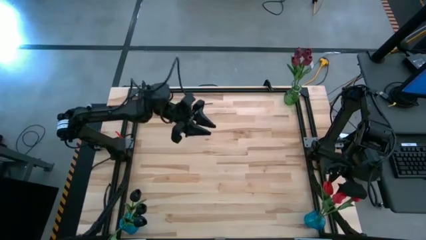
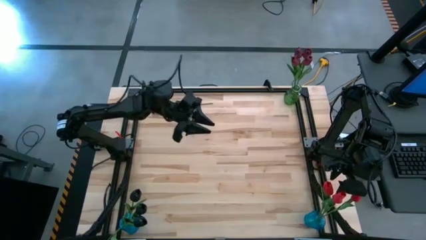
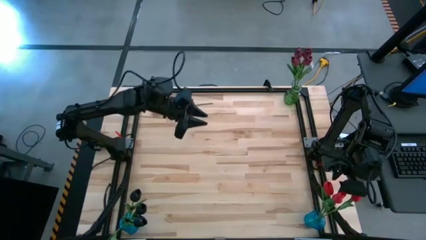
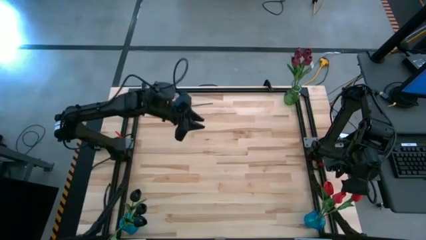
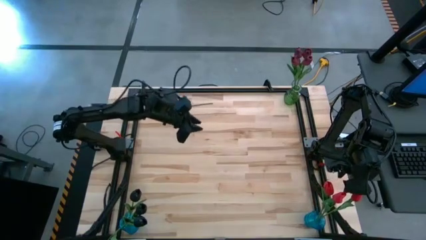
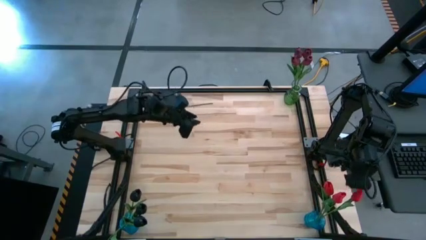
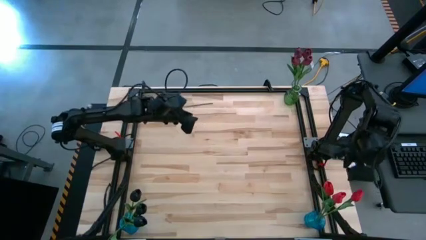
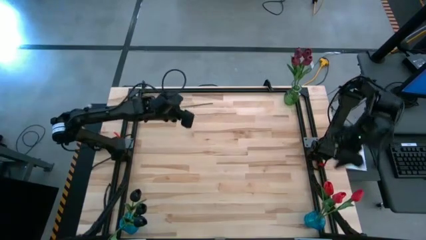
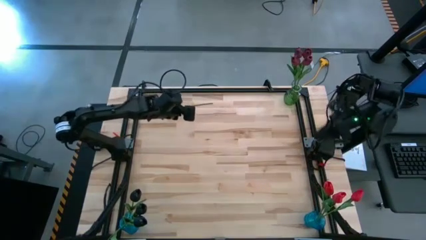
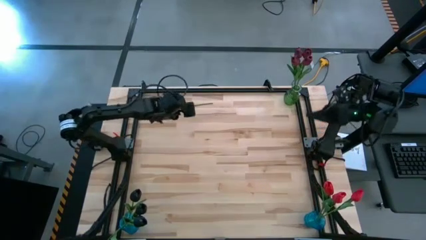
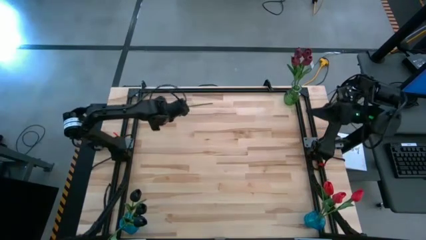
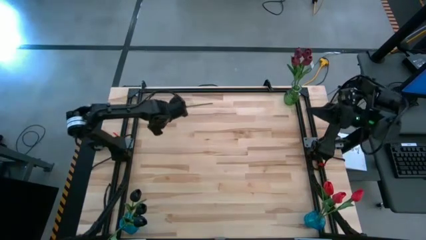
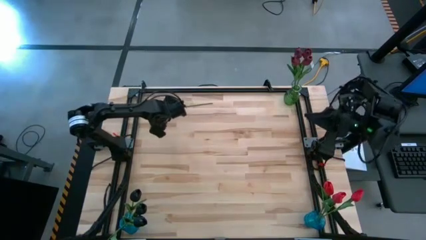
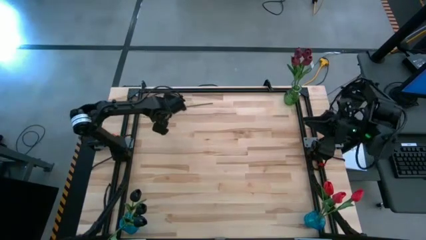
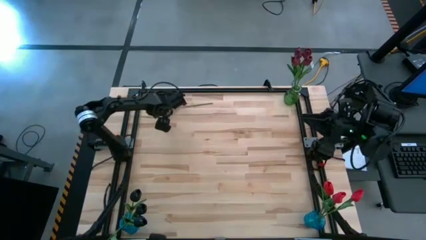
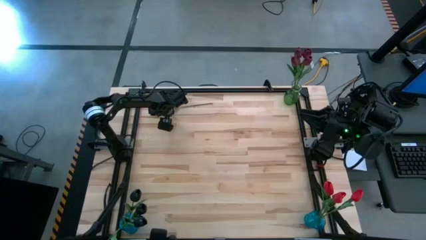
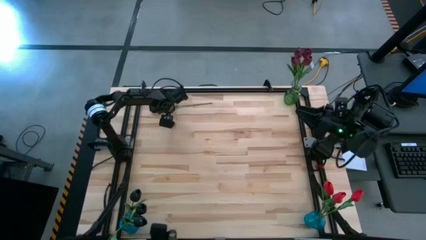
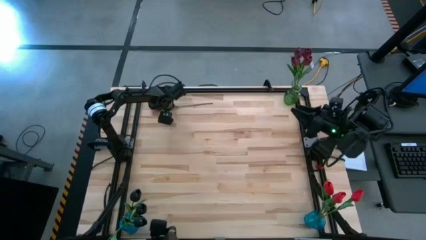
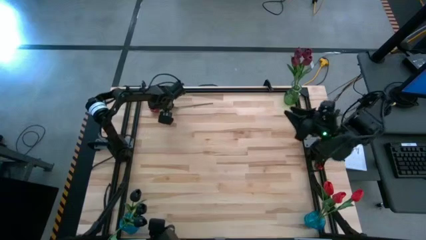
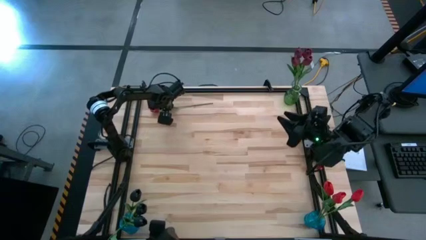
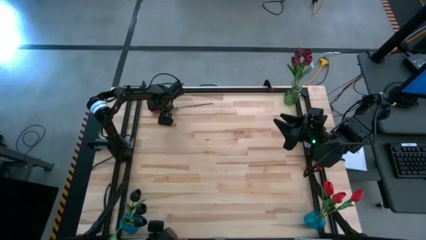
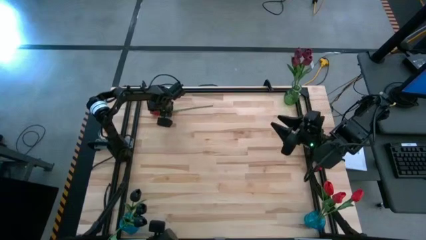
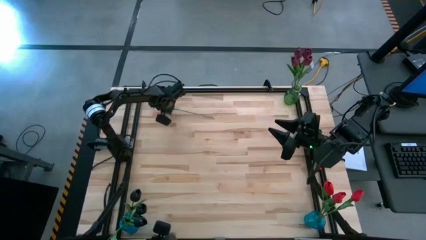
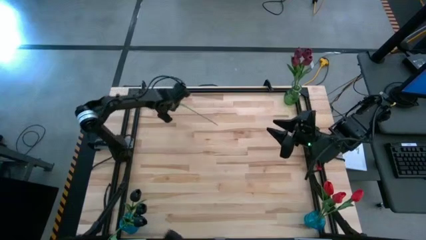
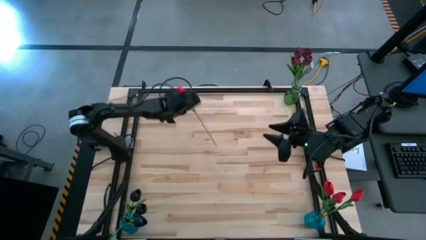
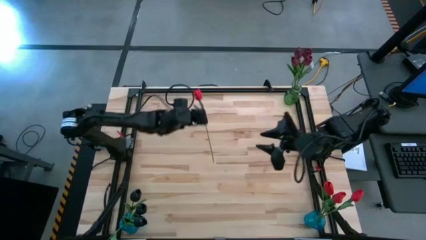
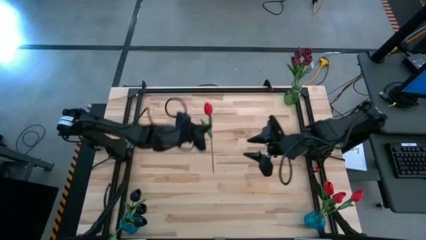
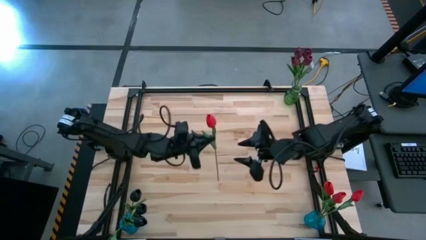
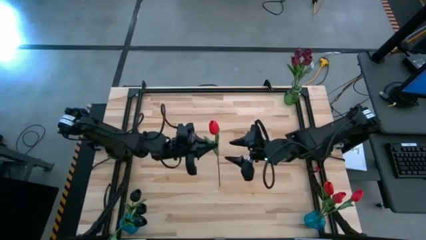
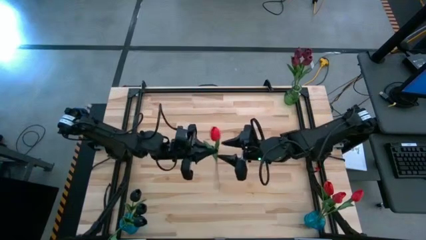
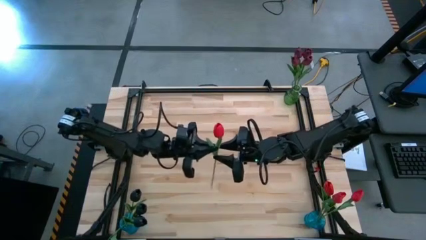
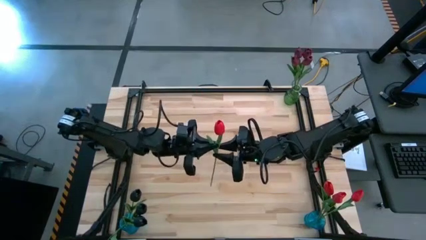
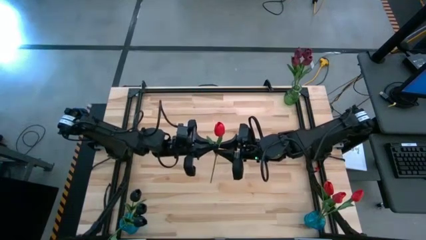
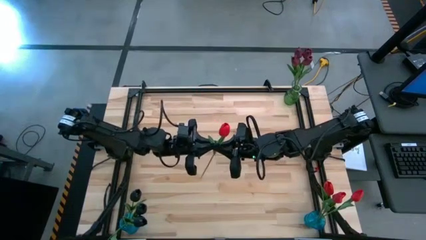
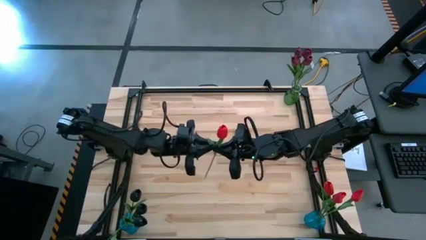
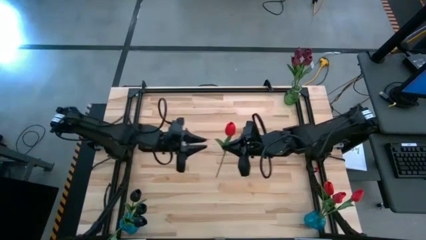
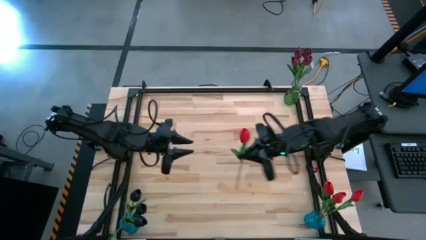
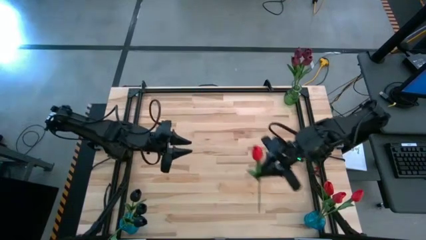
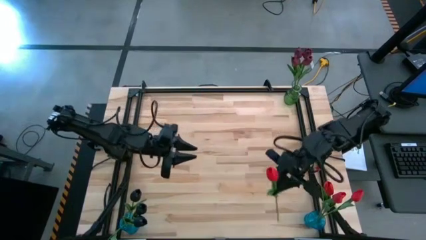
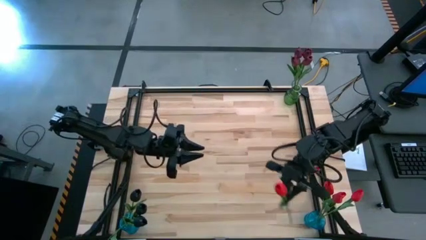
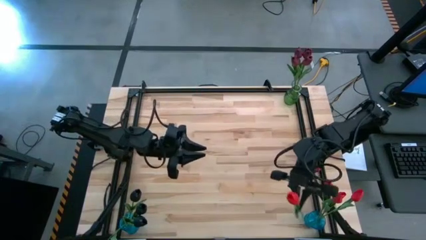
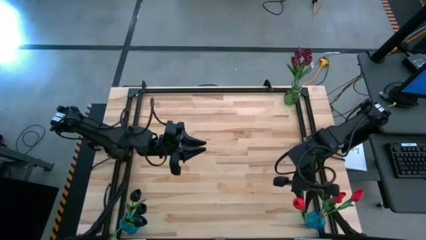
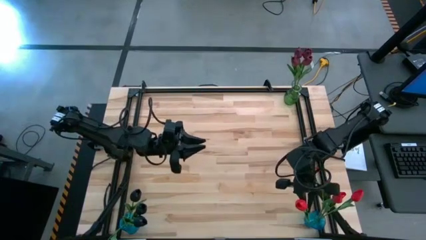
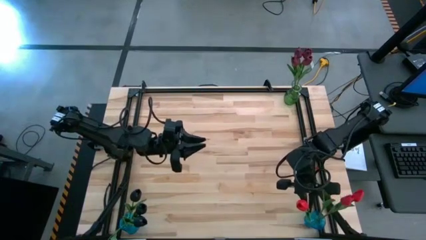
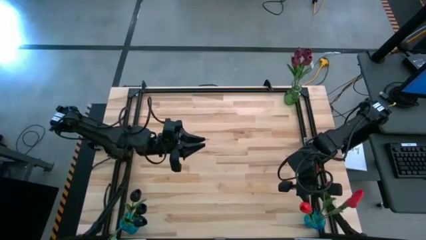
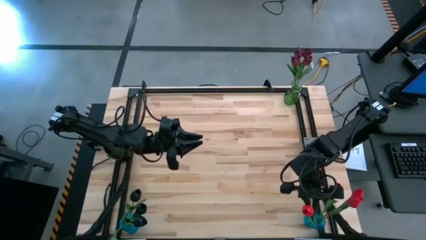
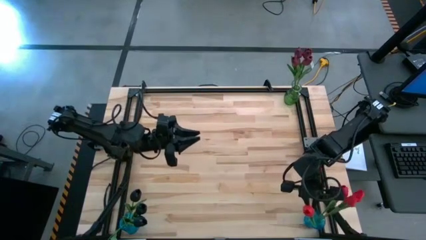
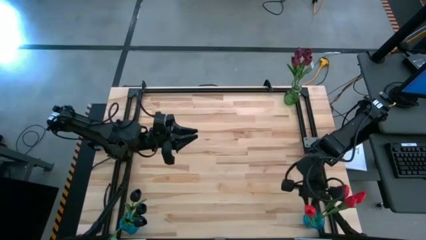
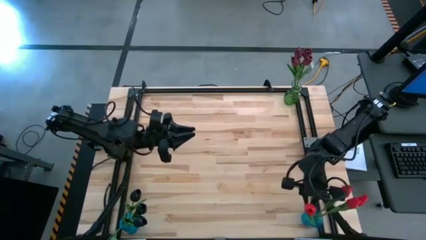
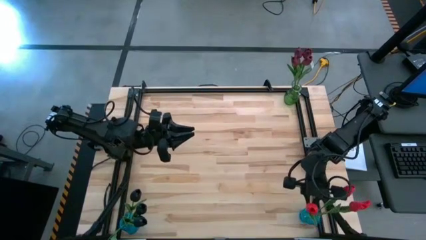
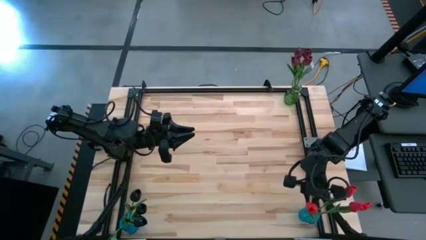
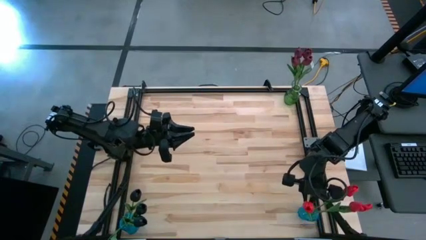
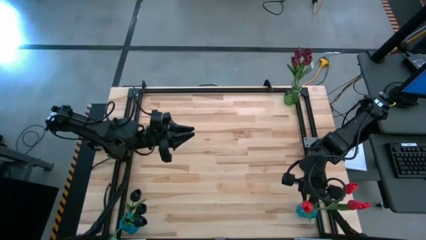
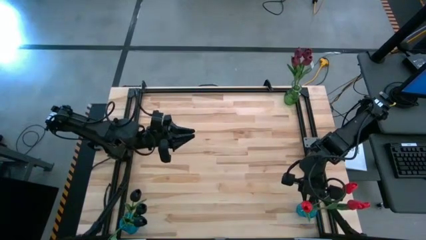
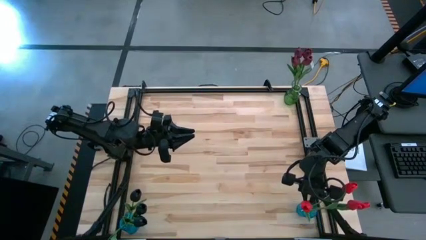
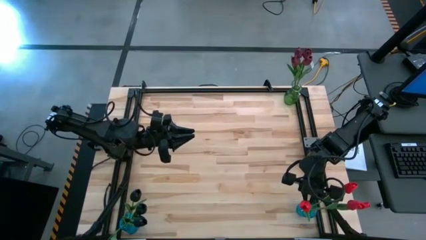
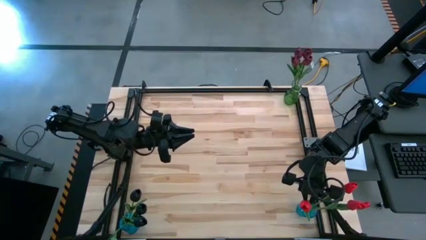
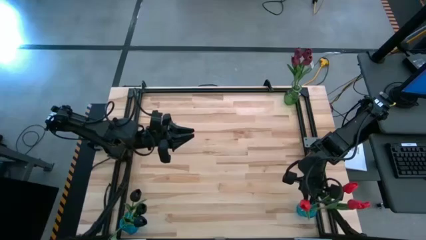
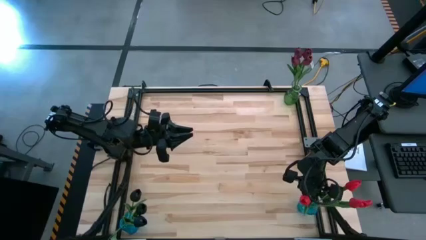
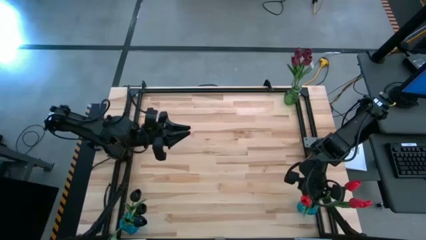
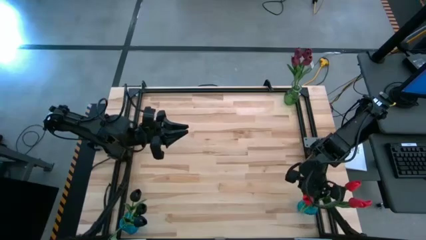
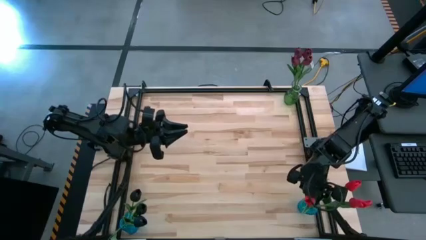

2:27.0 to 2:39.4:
Task: Sort flowers into vase by color
Put the red tulip into the right blue vase

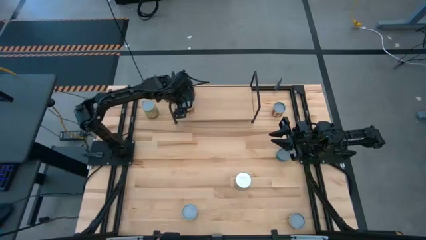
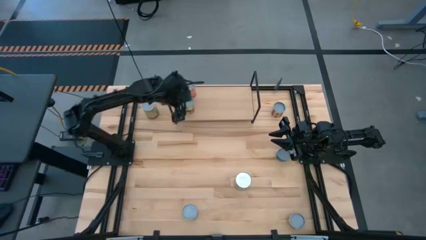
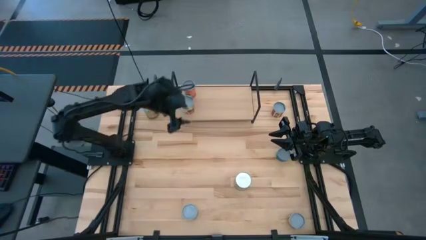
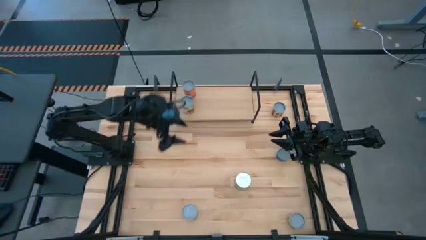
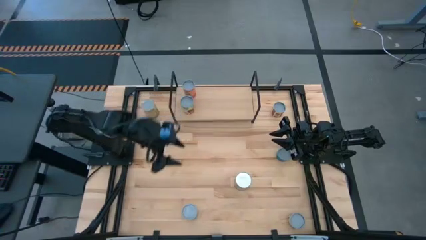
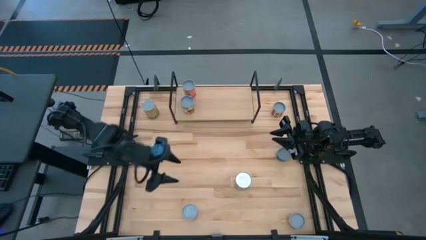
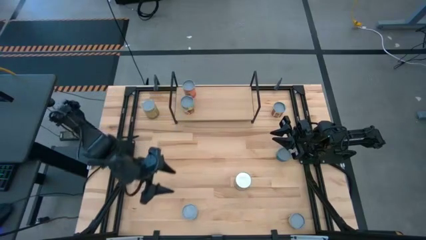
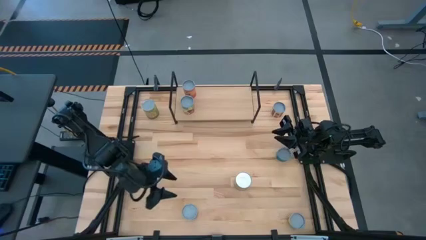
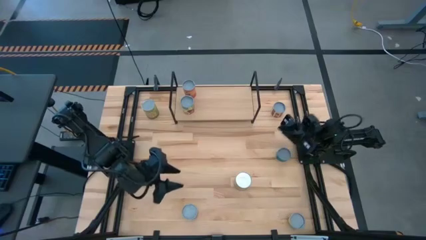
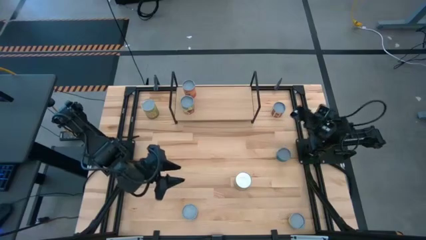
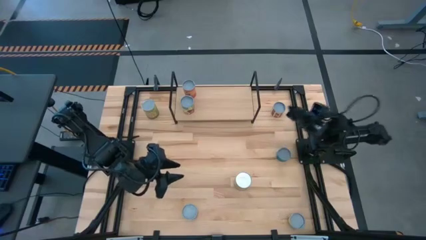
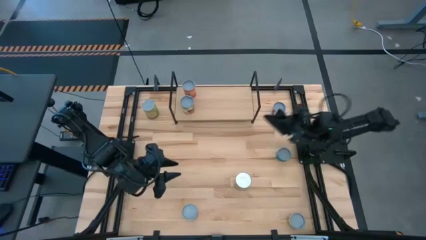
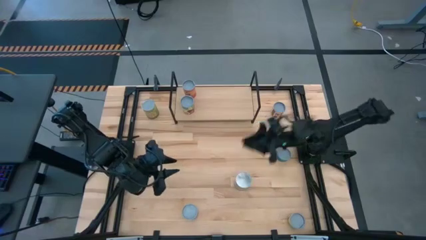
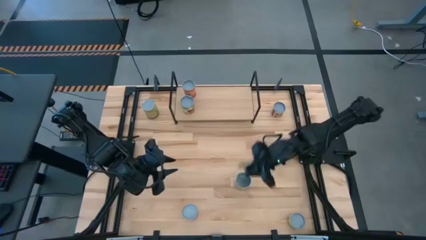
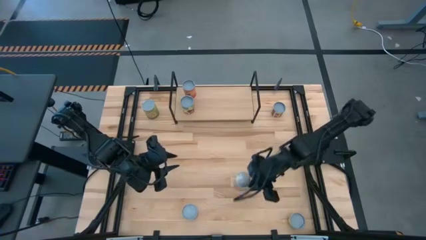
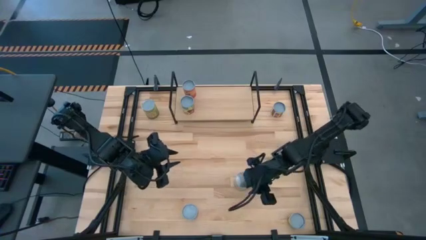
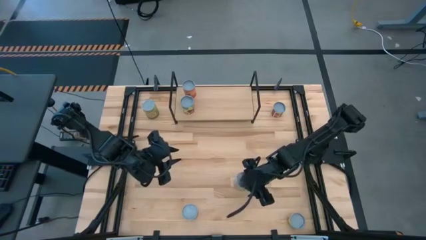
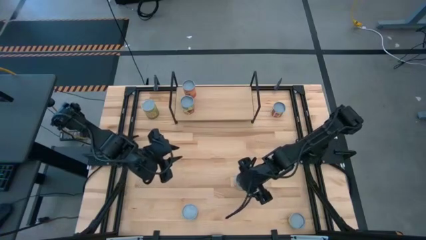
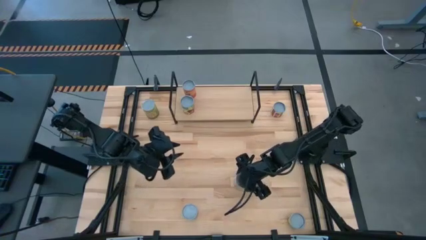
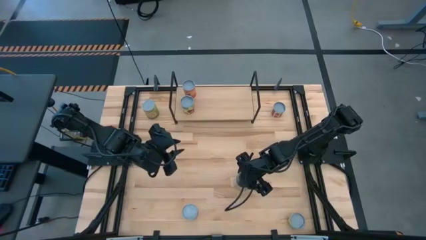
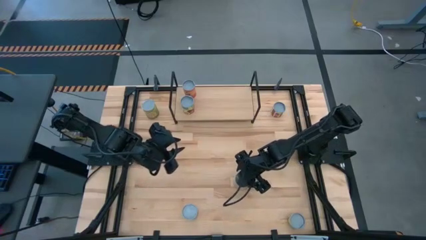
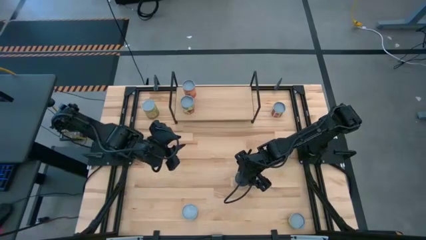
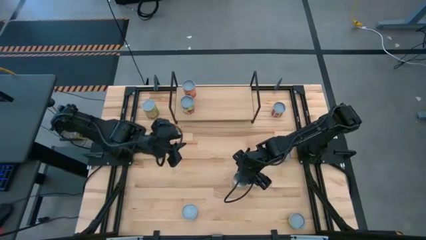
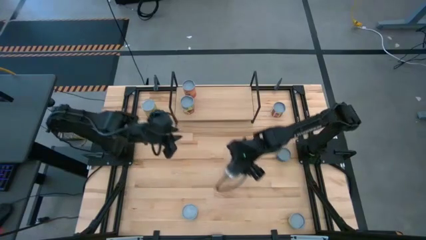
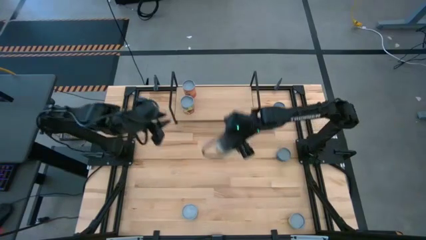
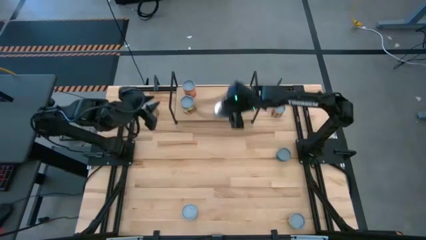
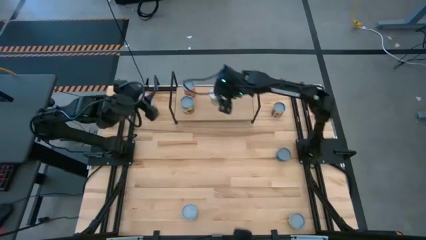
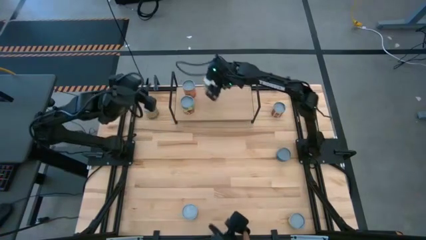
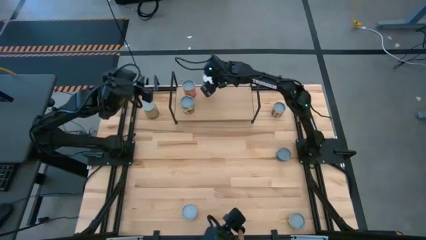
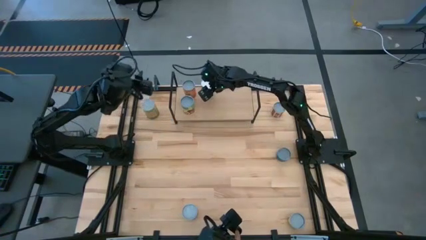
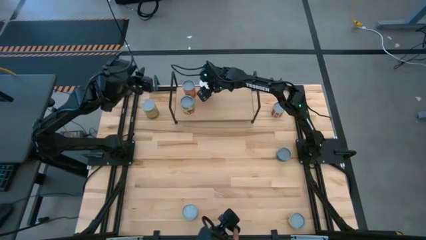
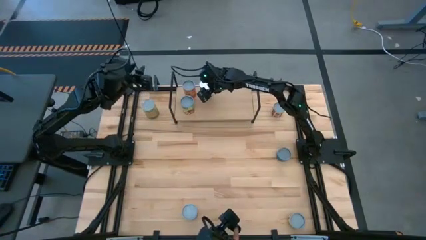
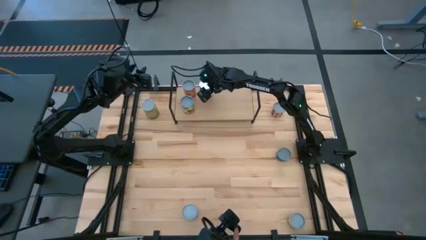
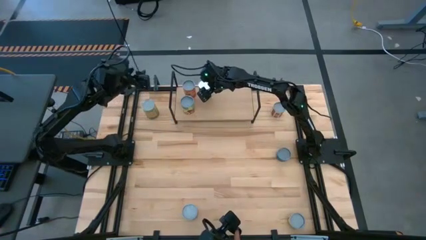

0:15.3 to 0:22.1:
Task: Pick and place cans onto a shelf
Put the canned carrots on the shelf
